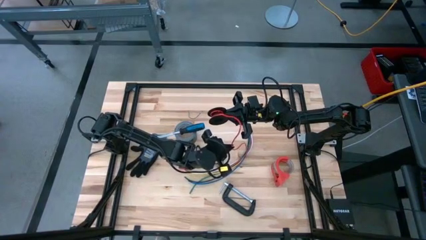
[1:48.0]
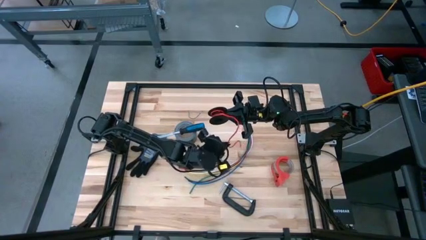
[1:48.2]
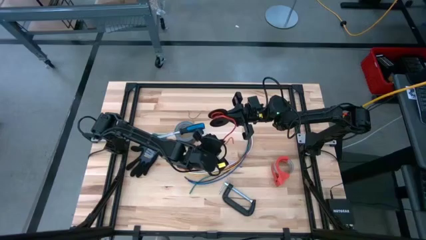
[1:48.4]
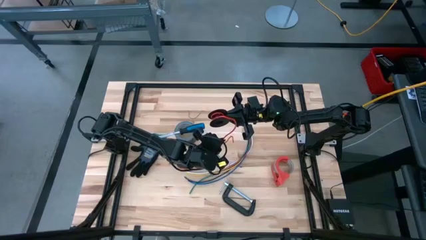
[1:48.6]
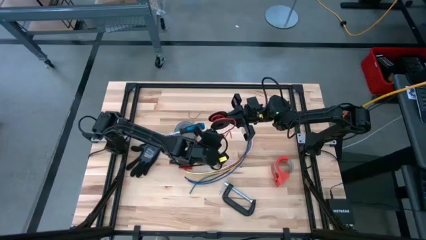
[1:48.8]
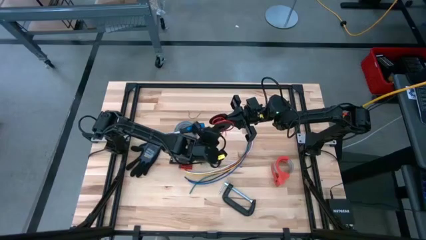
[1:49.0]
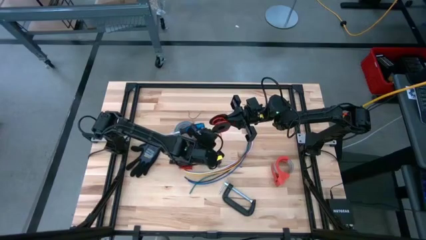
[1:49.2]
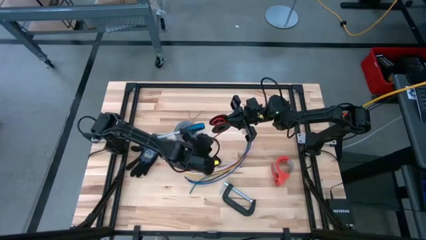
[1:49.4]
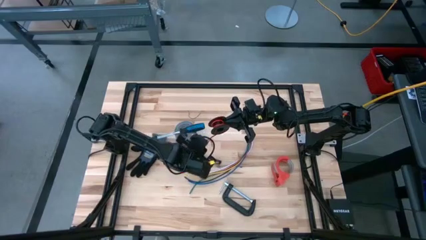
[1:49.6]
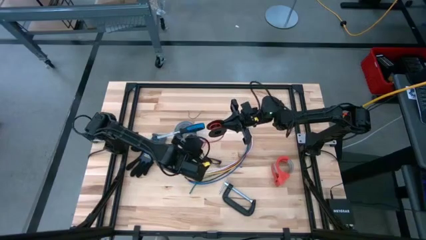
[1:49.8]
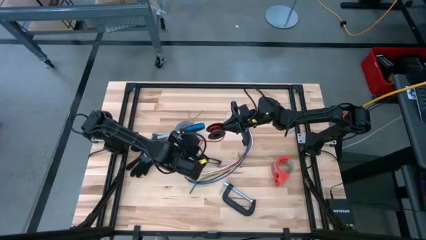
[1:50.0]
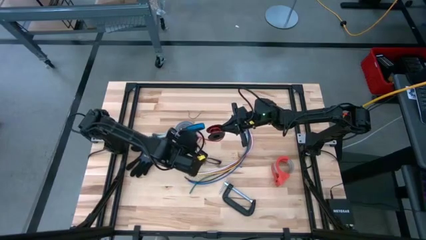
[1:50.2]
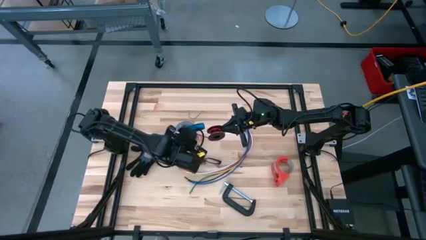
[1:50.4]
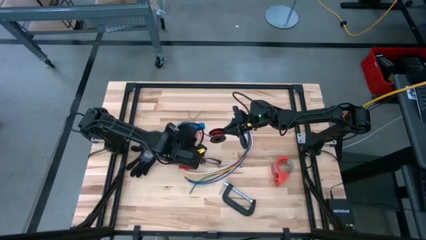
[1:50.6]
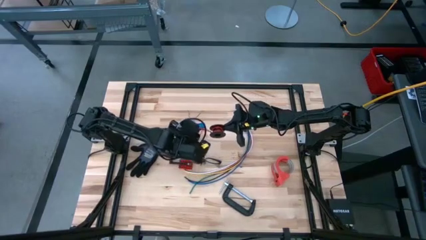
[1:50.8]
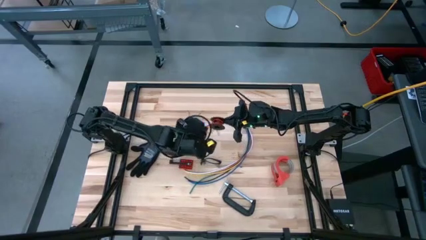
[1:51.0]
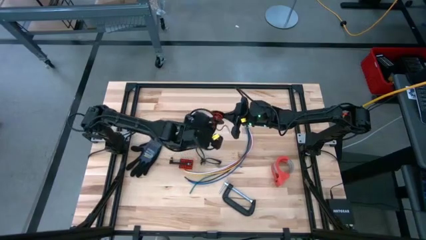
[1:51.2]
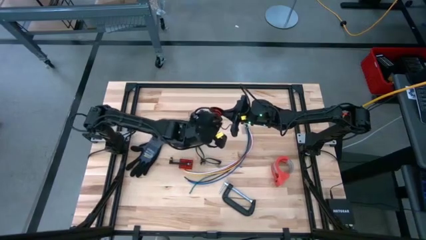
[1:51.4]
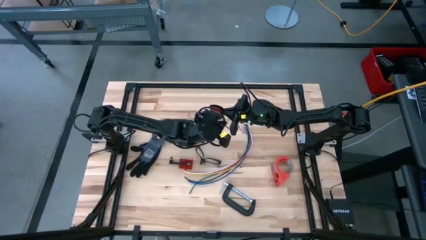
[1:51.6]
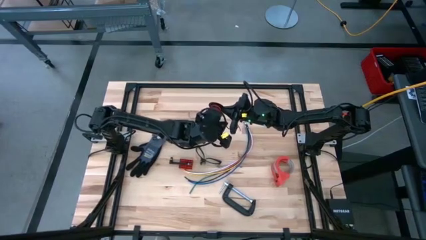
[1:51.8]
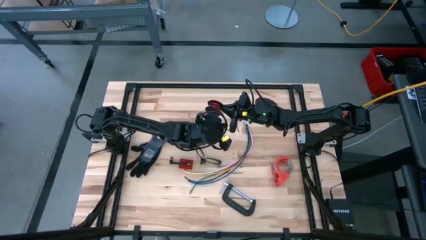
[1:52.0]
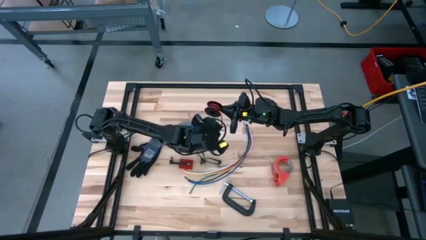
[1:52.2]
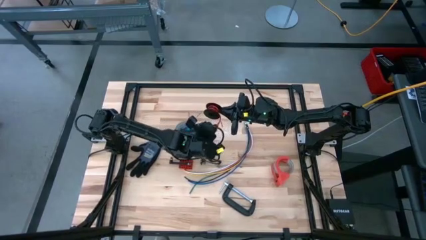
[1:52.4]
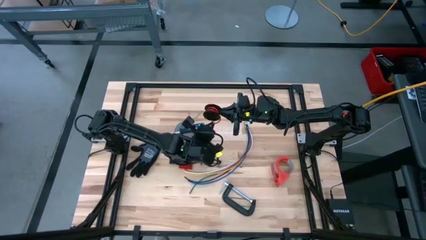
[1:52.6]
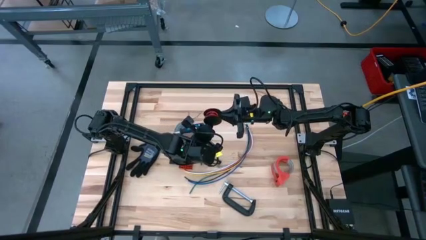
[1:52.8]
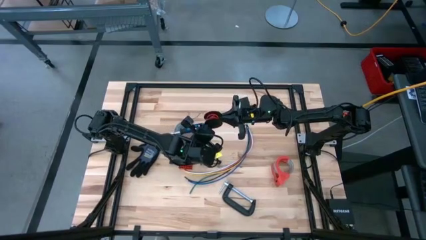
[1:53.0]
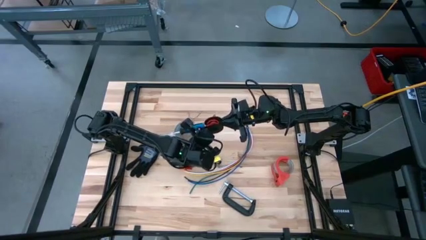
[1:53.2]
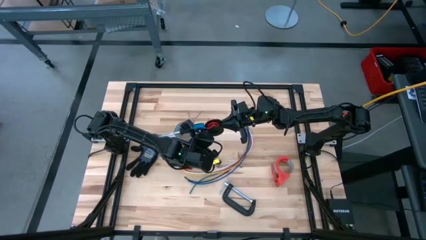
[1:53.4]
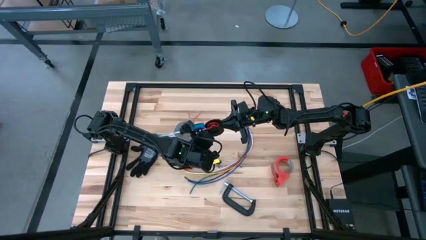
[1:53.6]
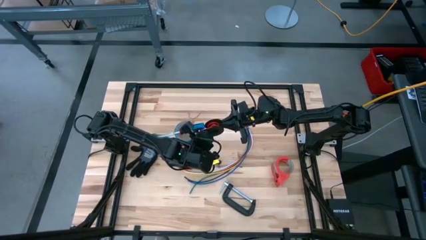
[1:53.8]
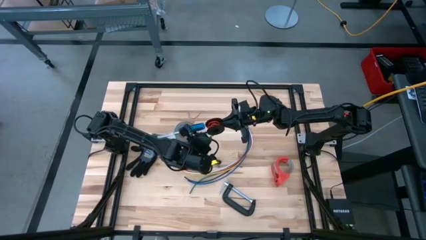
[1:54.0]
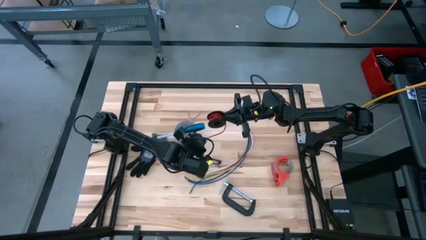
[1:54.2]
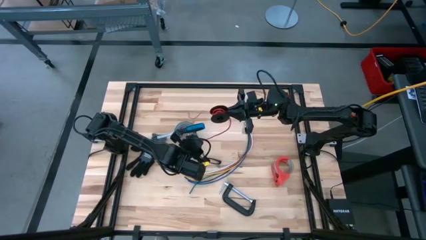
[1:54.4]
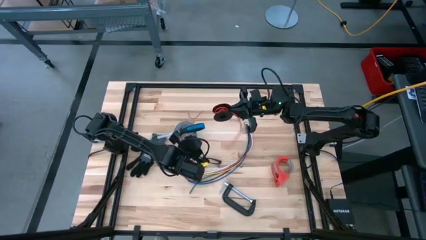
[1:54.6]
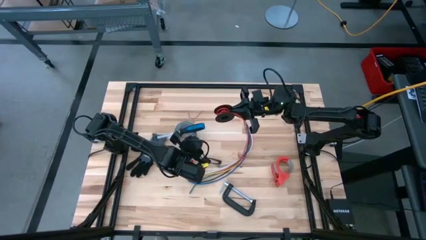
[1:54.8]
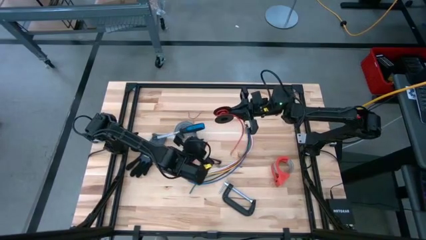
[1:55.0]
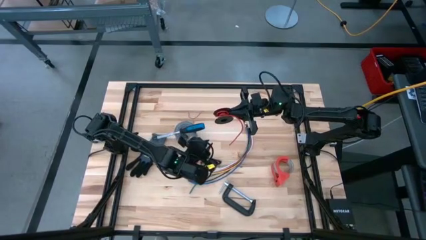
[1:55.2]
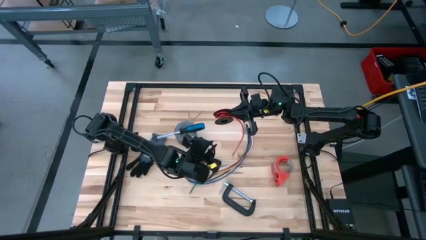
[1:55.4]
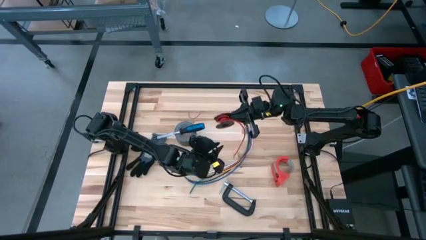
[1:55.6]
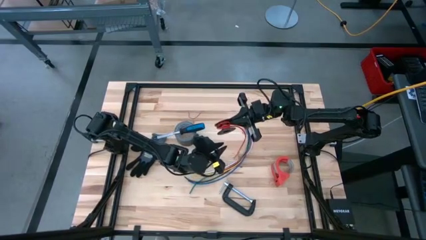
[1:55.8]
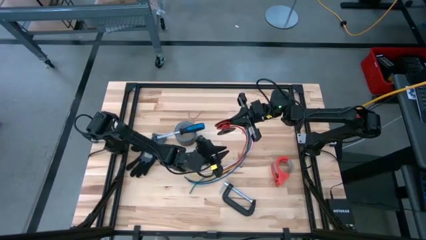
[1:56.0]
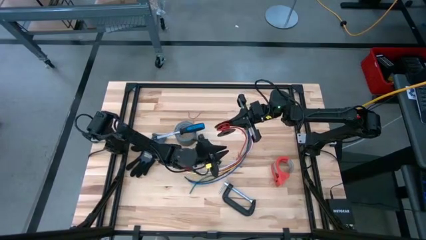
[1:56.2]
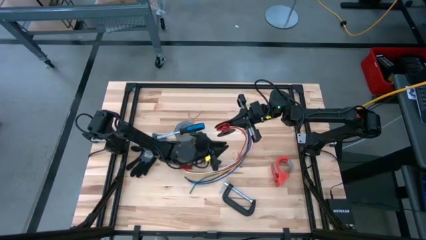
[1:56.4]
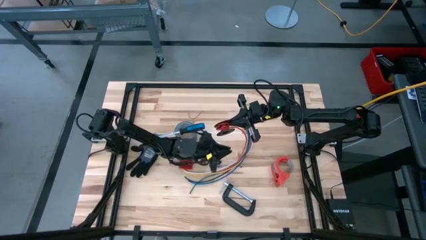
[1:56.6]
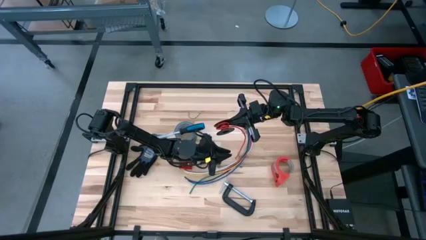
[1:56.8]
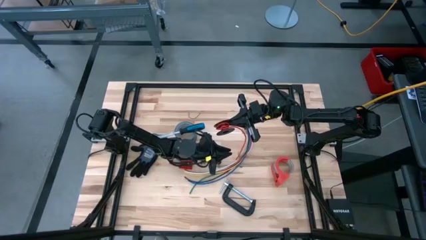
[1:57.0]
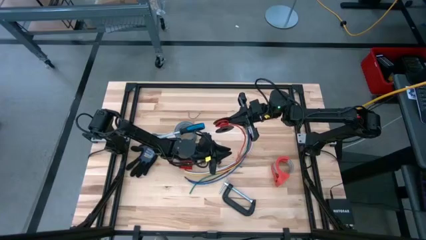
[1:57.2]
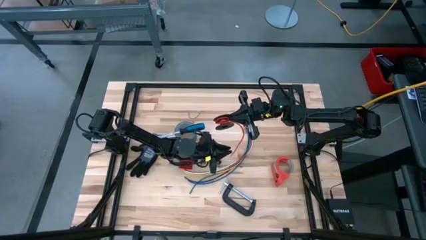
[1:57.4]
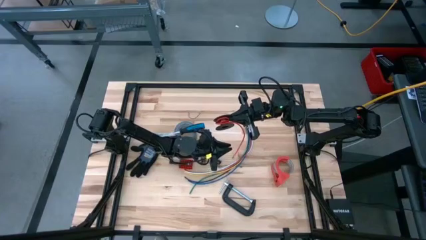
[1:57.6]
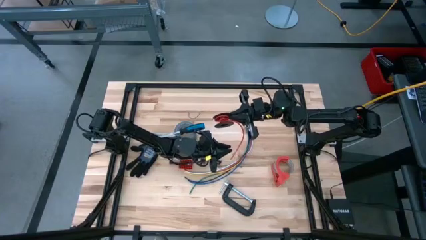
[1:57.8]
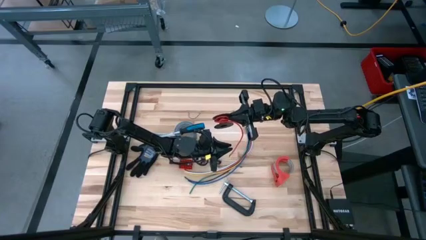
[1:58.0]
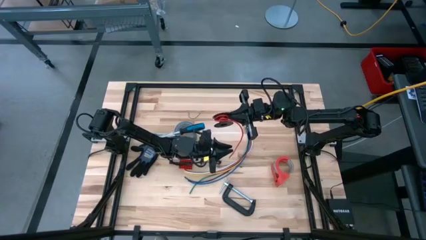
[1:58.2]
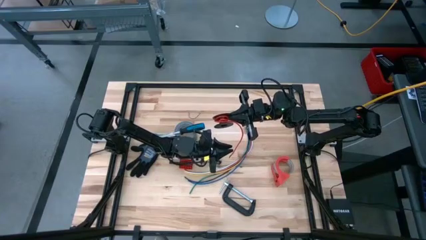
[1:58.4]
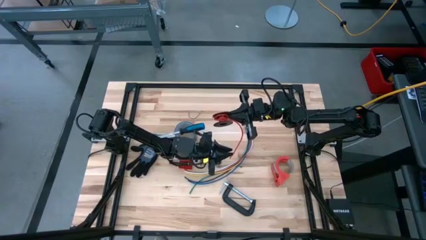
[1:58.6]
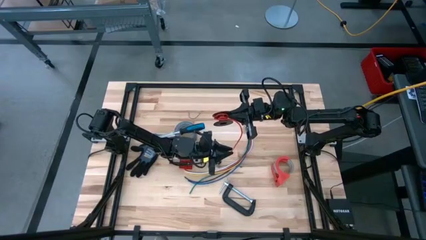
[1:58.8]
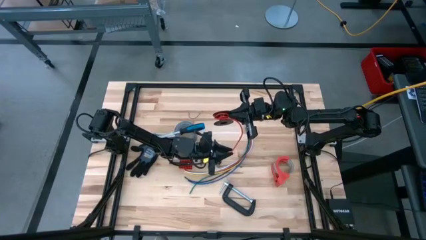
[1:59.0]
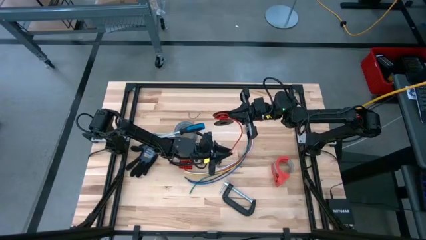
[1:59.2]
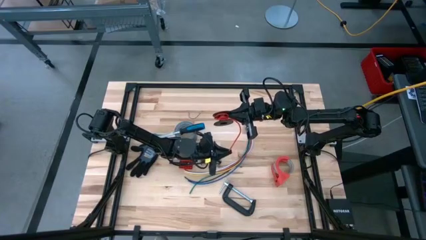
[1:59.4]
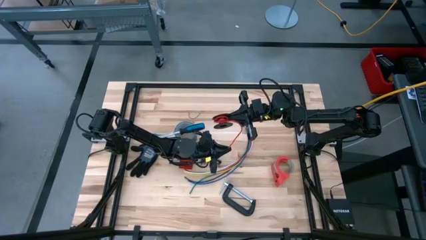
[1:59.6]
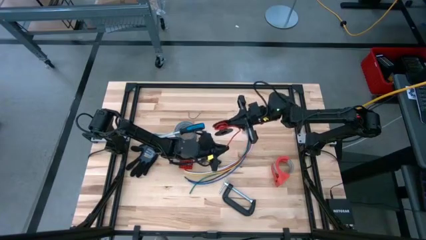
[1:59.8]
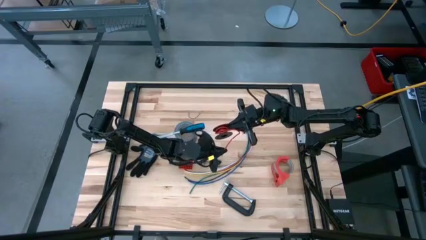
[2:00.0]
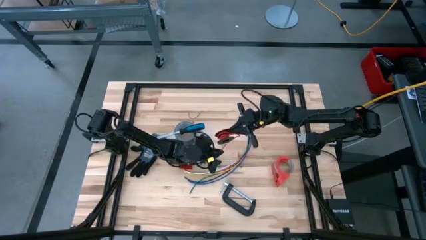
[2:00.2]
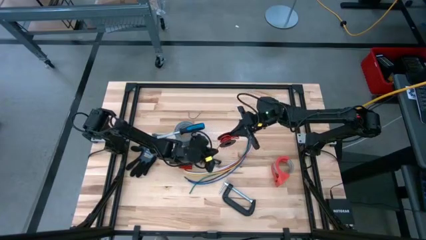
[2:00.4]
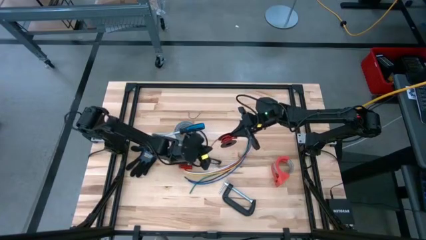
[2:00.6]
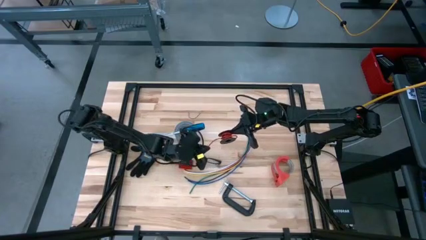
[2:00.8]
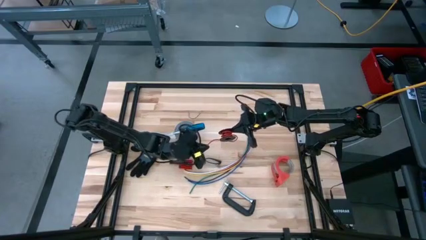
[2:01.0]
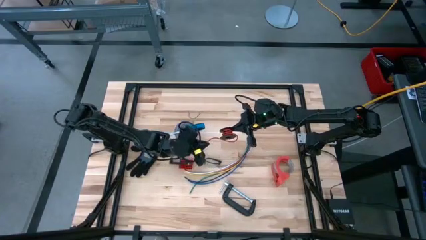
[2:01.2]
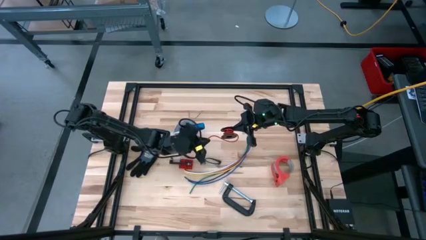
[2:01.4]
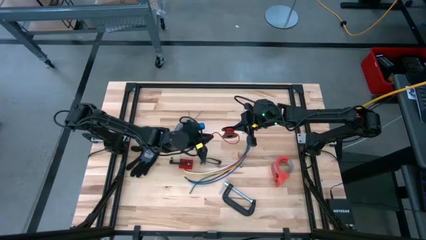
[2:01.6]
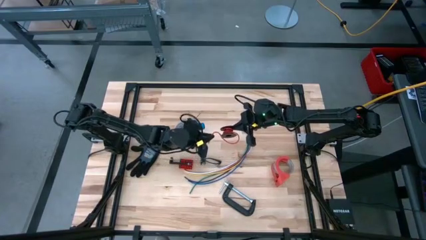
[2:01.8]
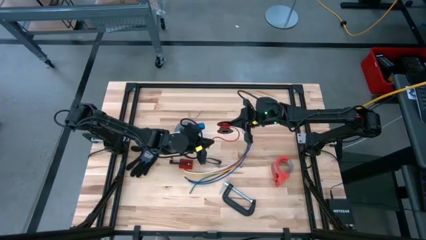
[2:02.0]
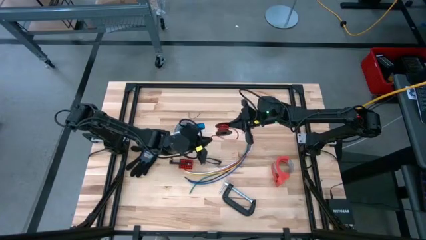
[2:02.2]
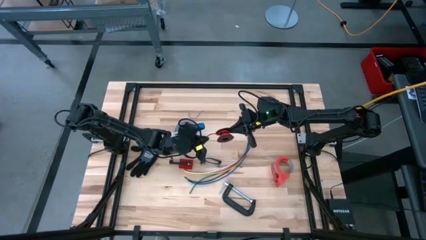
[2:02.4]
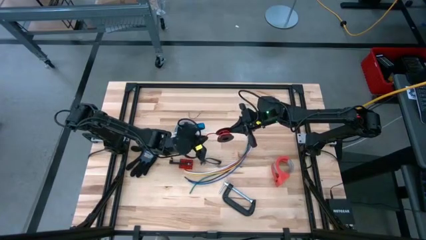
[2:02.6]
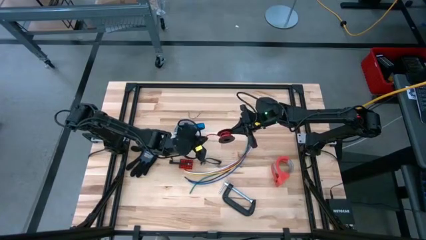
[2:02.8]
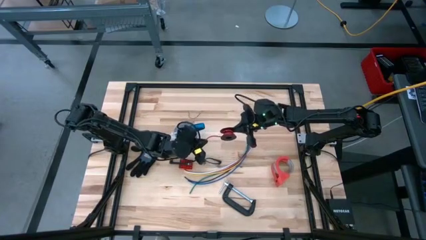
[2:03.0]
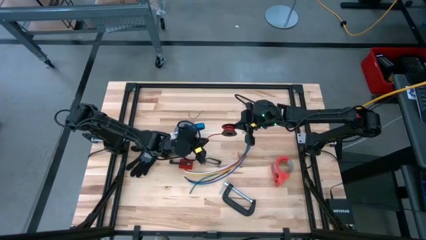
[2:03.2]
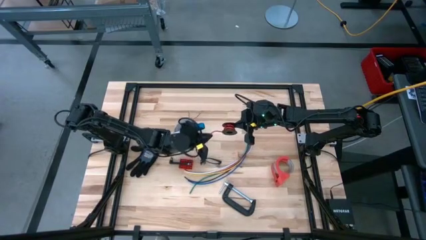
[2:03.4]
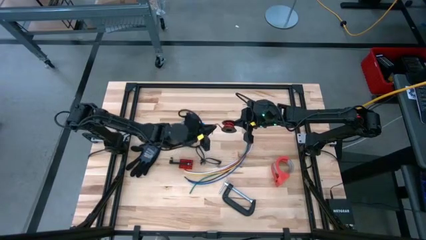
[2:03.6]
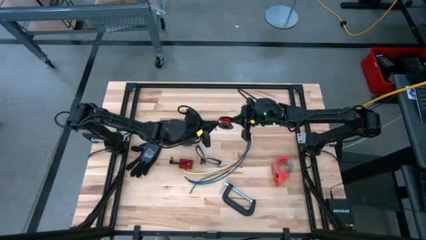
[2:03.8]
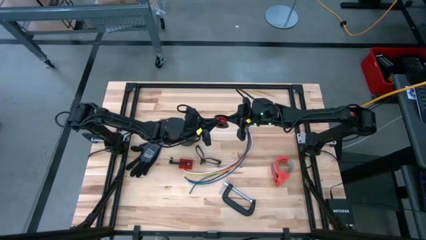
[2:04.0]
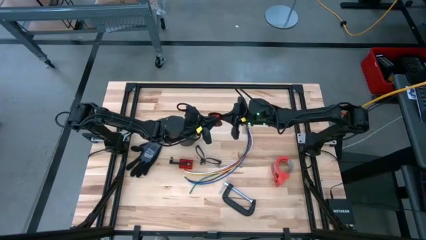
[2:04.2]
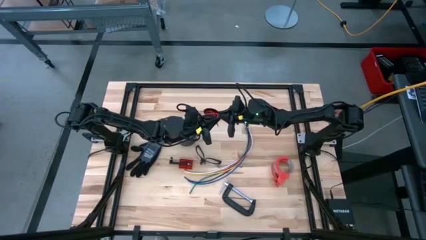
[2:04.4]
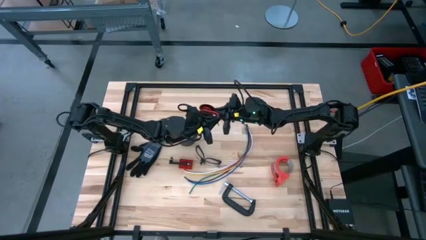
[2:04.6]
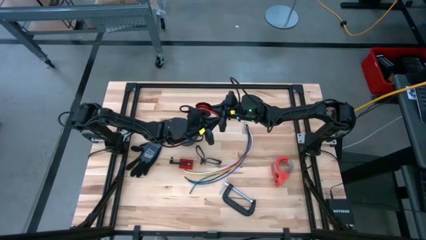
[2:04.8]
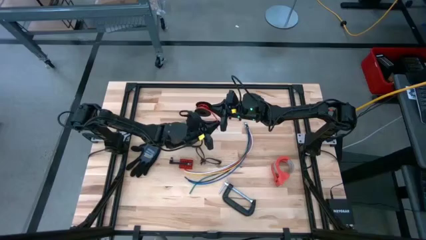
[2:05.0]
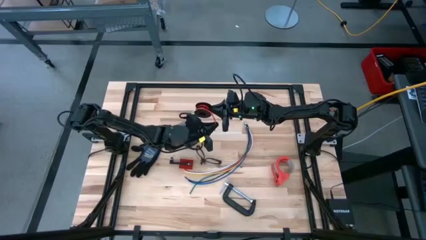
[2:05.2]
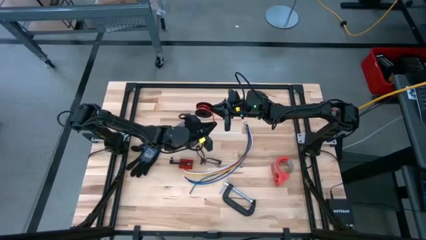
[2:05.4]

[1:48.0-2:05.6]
Task: Coil cords
Coil the red wire onto the black spool
